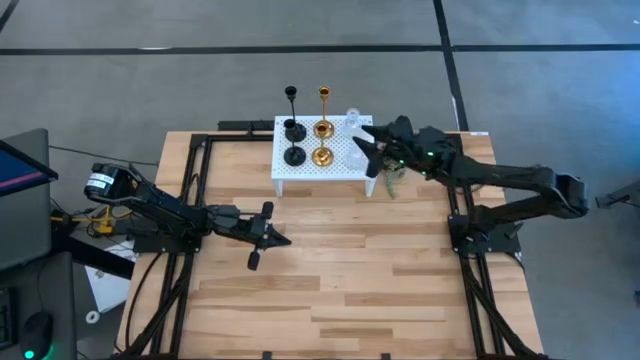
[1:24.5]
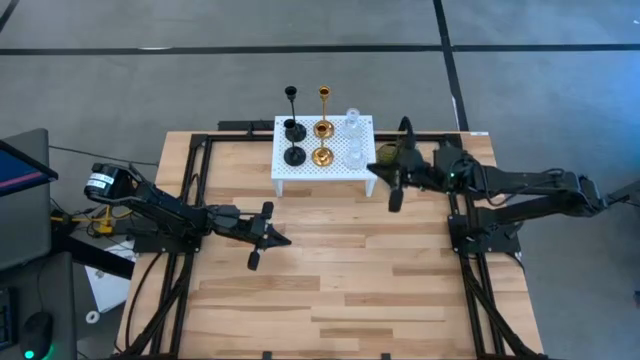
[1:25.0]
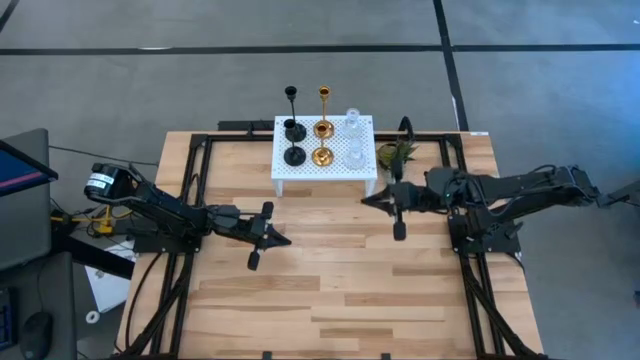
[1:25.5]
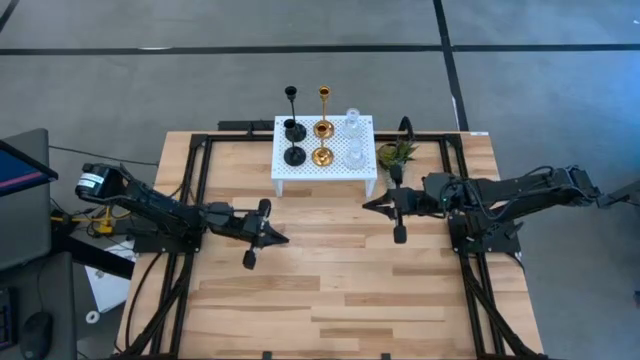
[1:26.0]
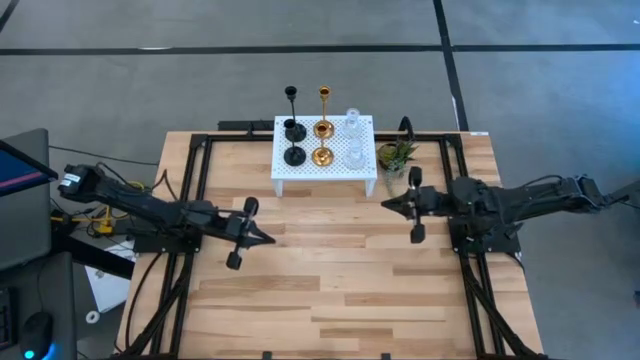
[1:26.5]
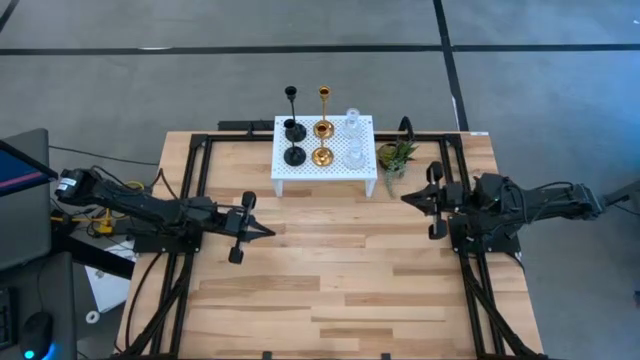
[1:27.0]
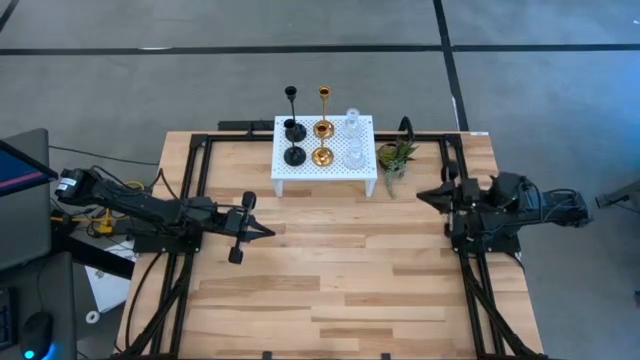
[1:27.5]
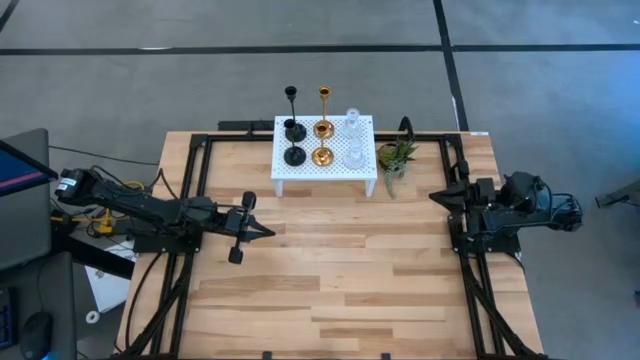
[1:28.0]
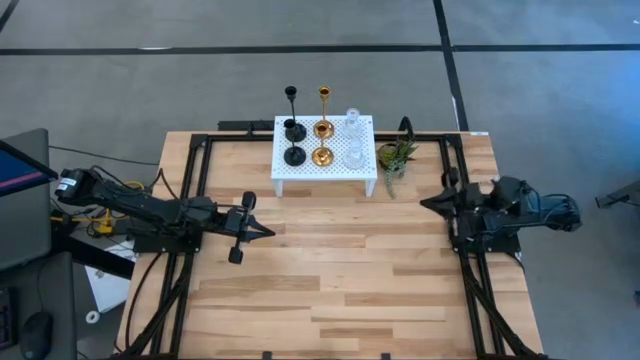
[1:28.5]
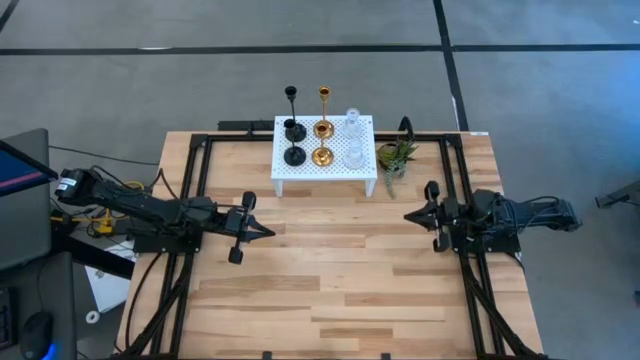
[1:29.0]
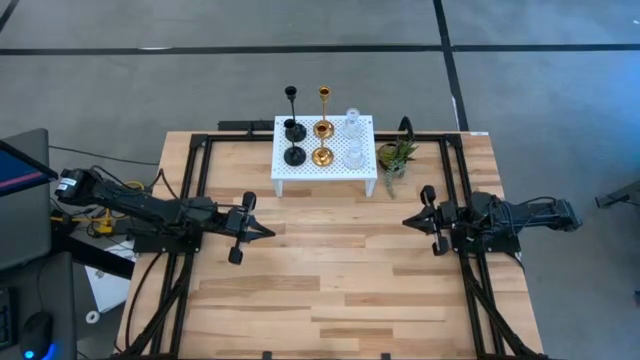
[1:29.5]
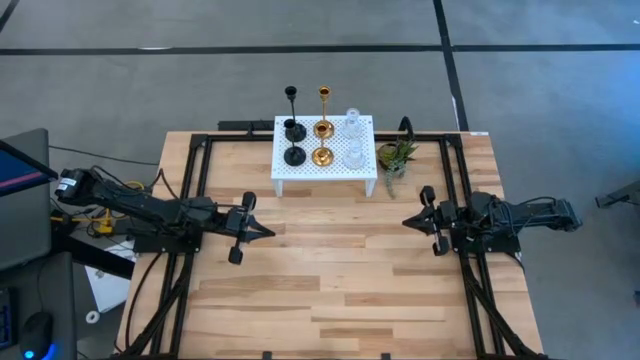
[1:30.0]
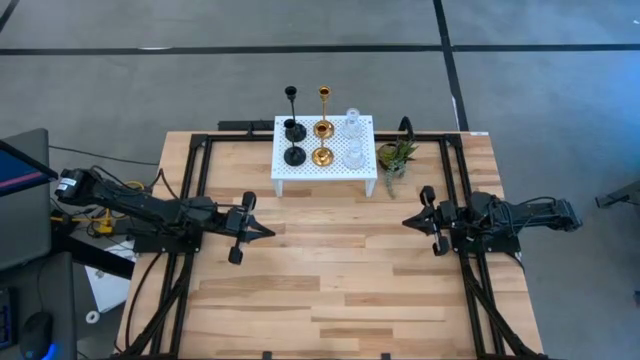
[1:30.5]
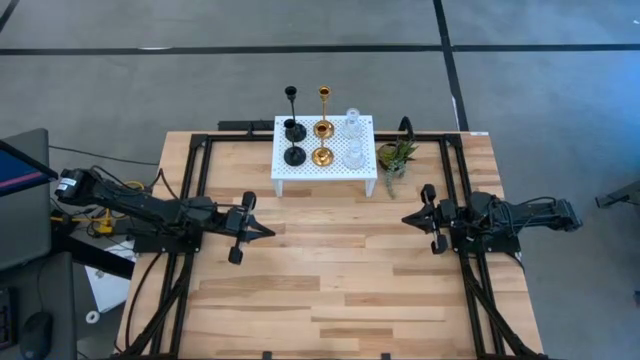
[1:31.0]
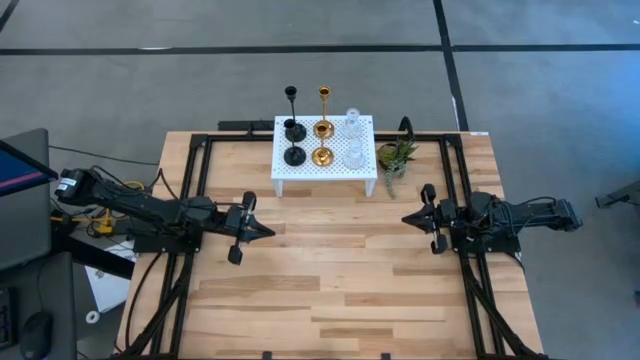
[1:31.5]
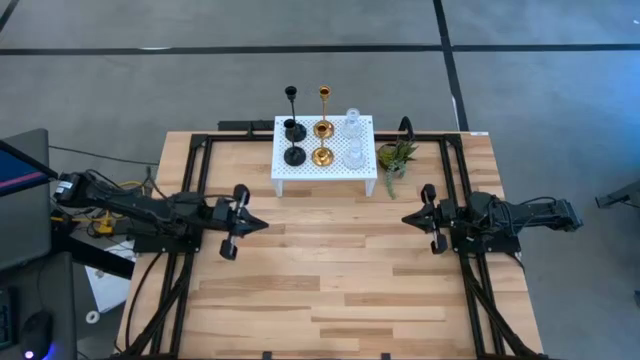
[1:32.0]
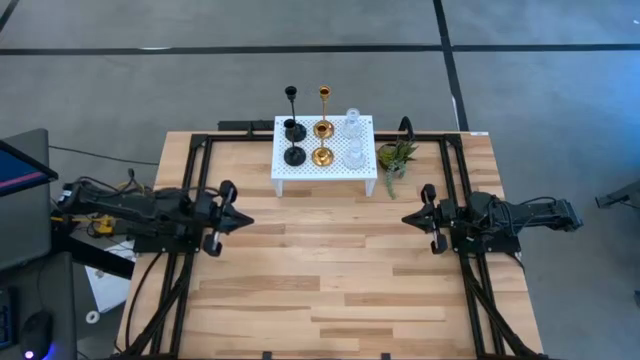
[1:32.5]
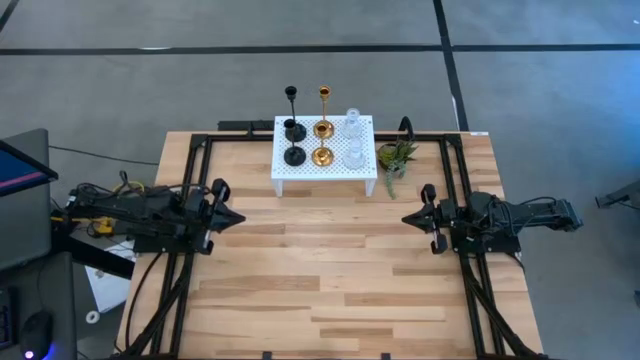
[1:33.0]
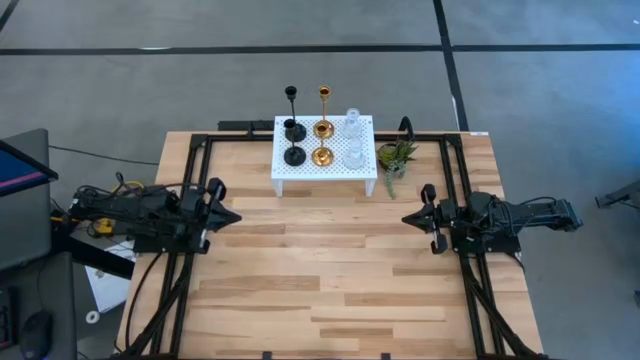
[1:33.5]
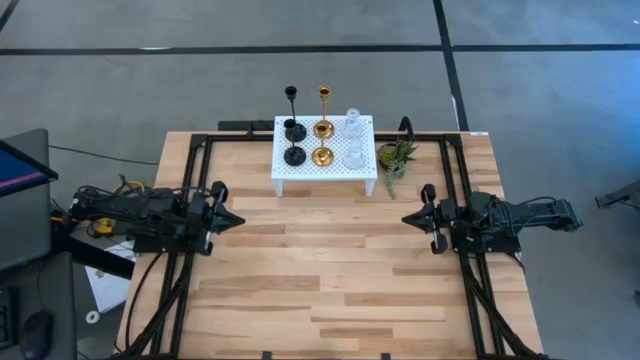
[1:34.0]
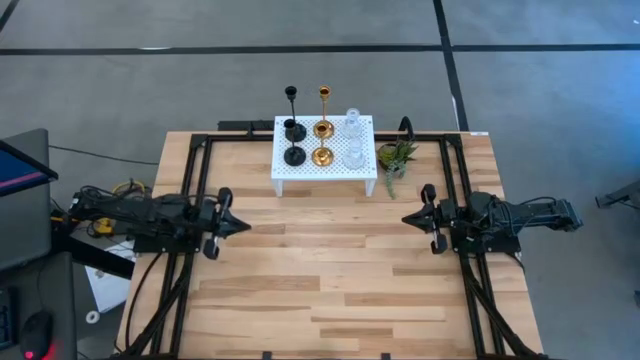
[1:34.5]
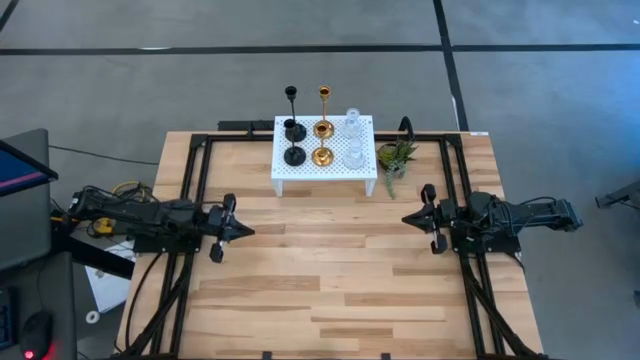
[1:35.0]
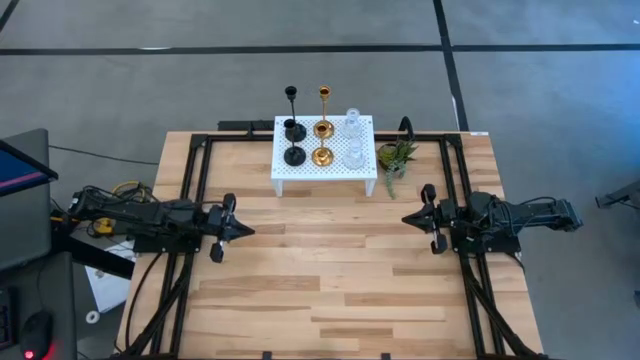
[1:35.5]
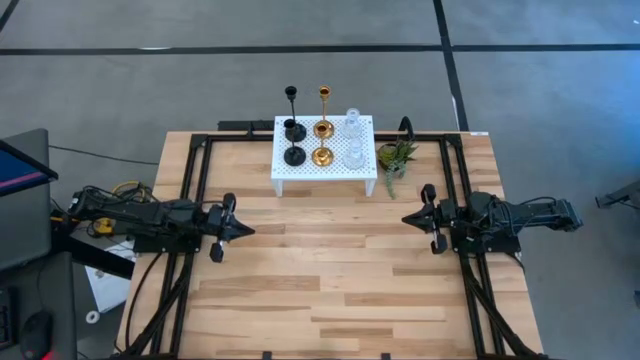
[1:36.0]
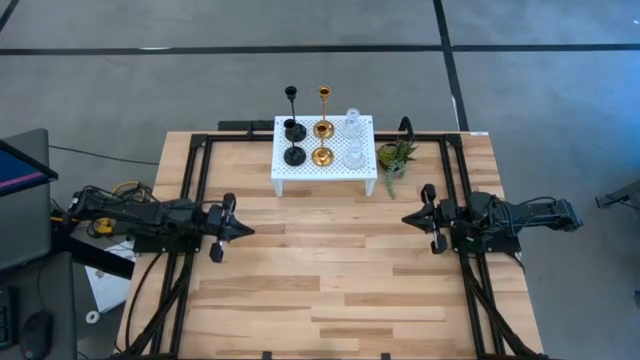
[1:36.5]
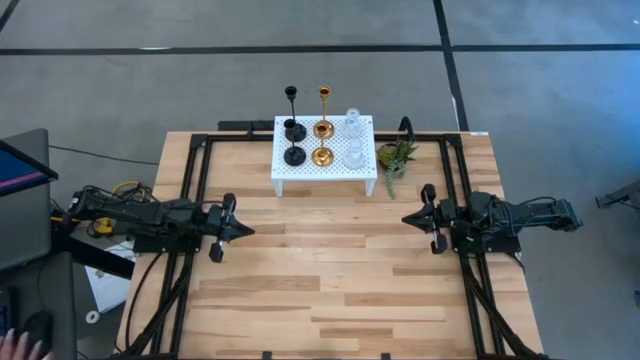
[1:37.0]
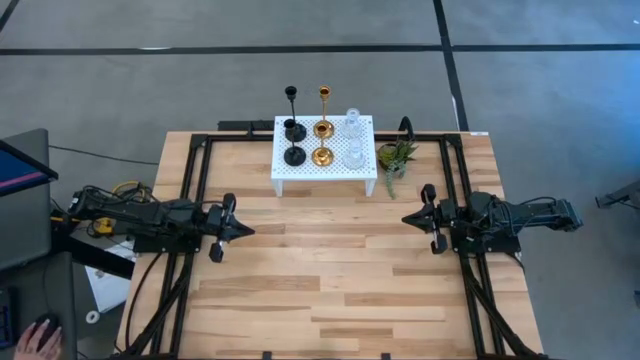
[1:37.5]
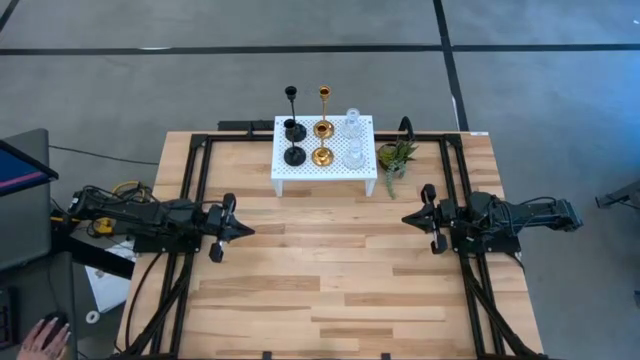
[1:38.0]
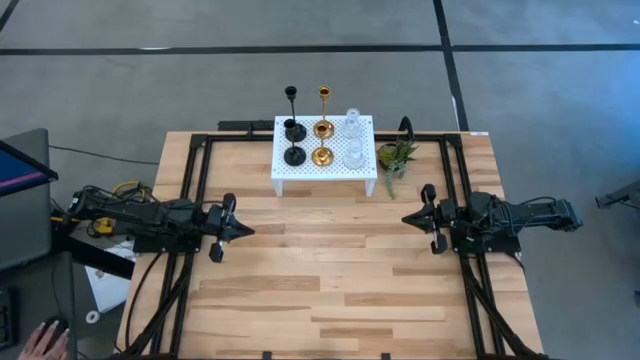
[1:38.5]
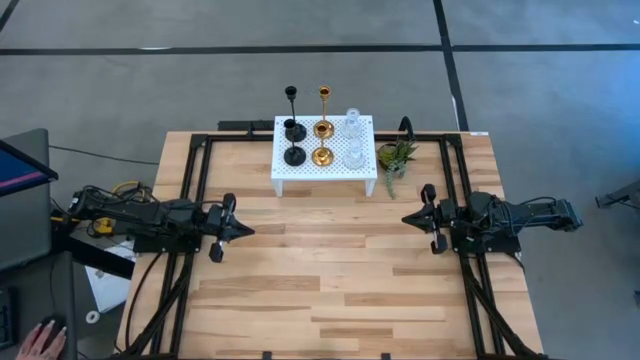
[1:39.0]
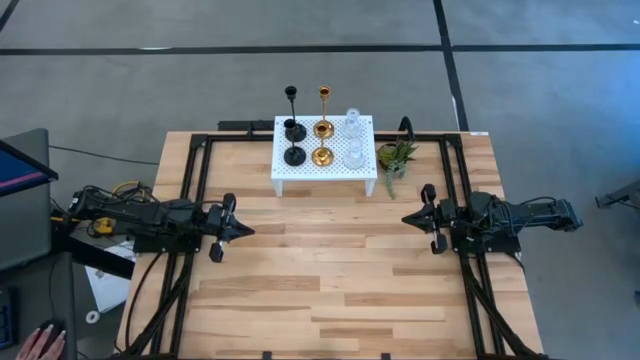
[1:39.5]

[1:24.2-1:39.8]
Task: Pick & Place candle stick holders
Return to Home Position

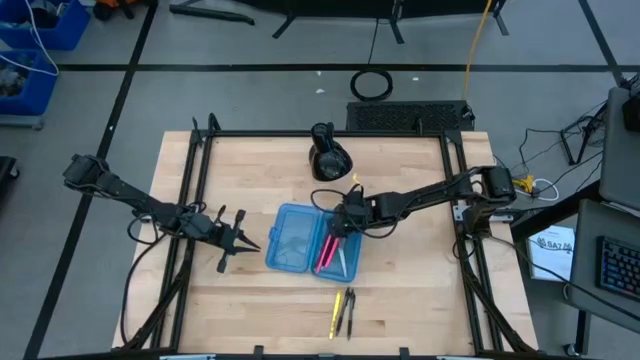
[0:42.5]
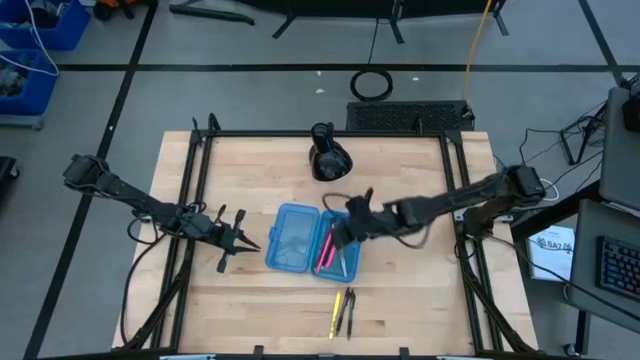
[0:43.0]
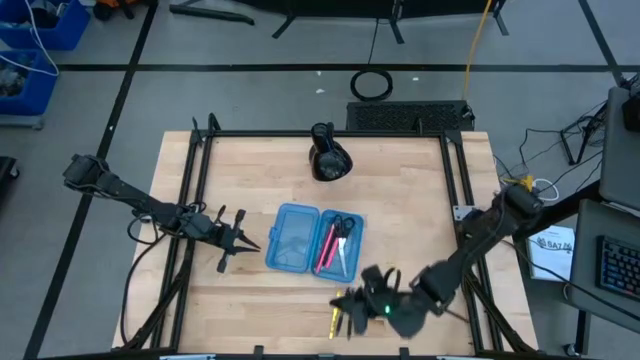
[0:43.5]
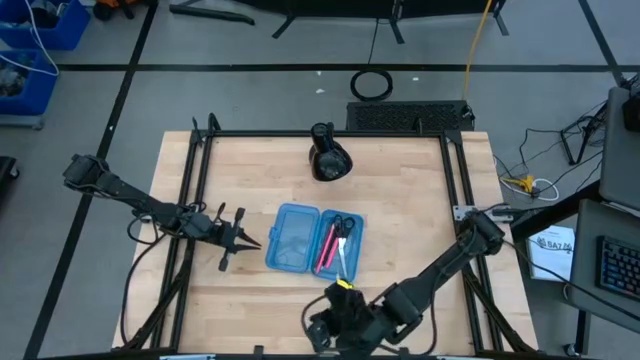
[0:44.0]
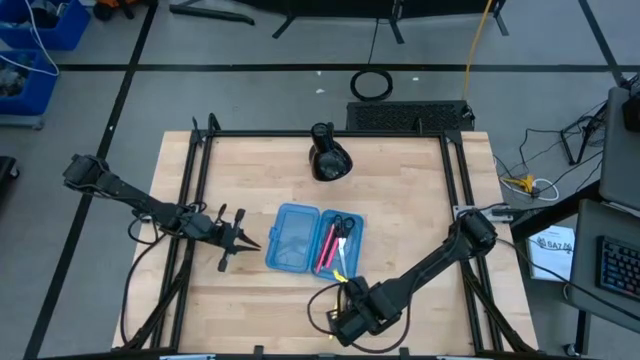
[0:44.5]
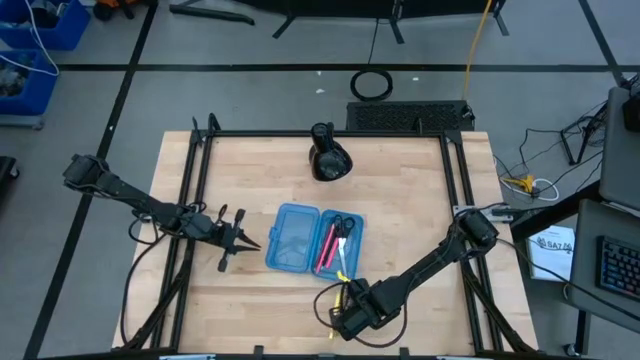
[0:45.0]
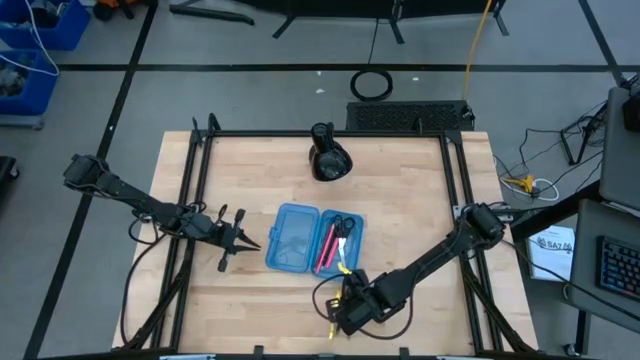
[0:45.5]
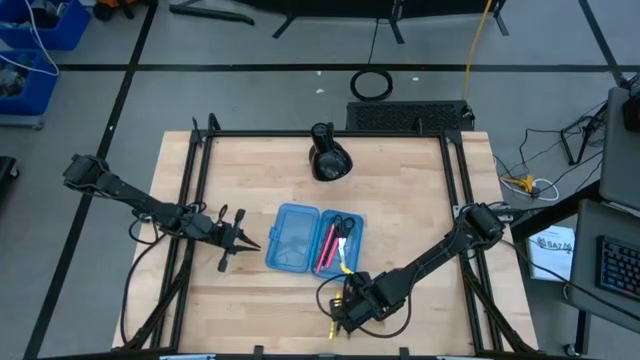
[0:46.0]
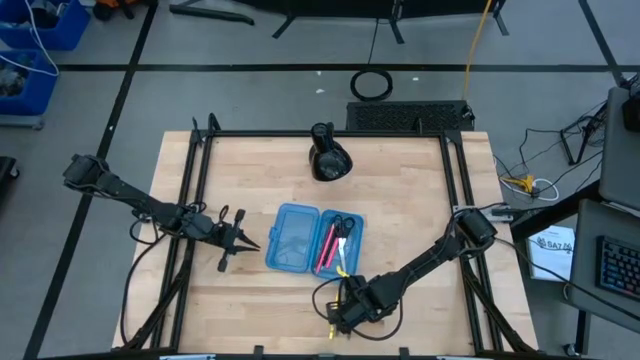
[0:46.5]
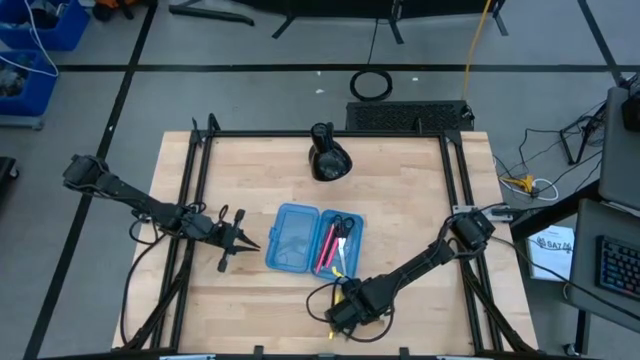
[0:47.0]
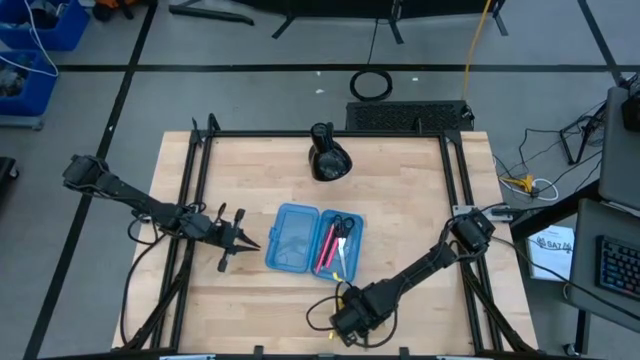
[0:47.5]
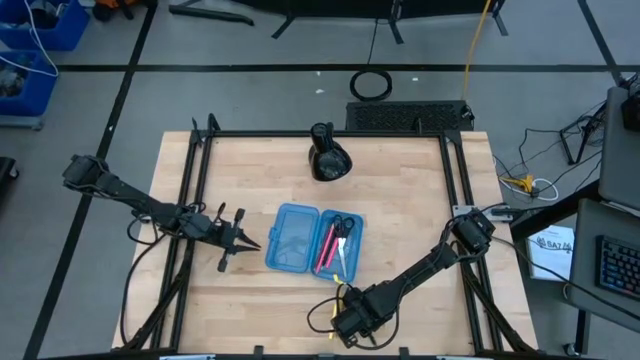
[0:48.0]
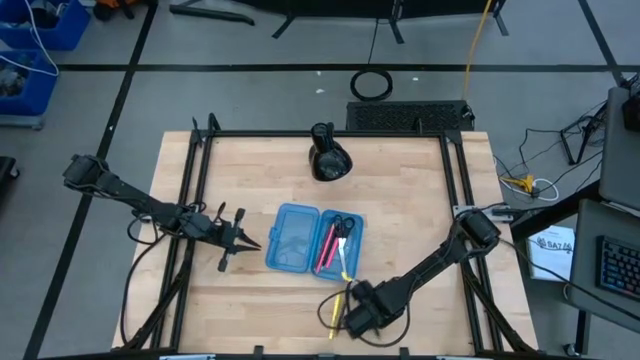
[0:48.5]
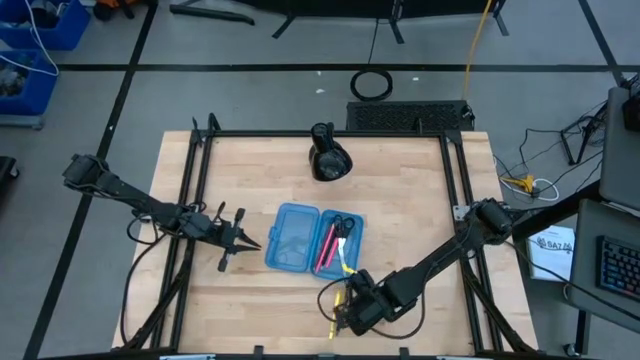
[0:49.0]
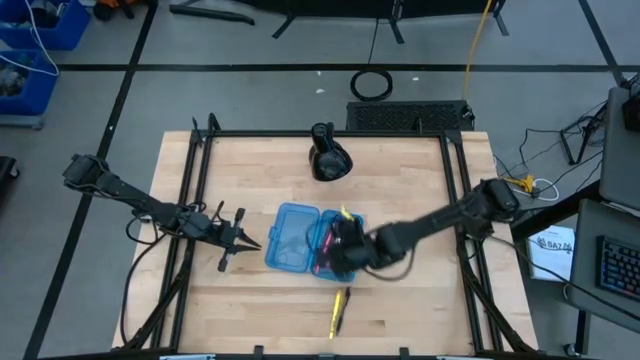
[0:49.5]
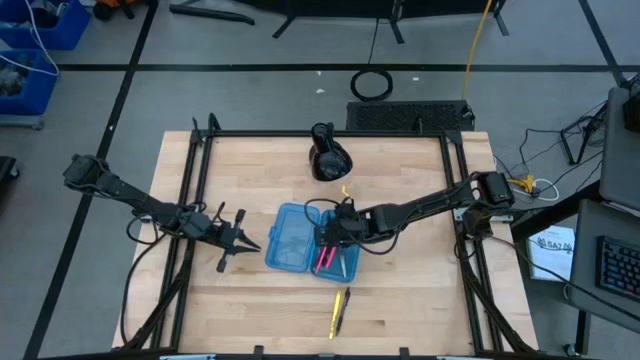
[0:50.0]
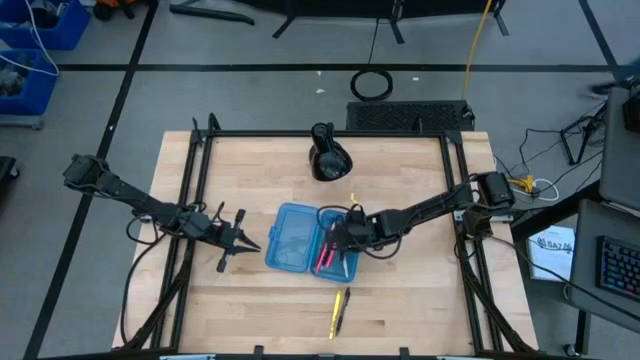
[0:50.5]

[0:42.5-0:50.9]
Task: Pick & place school supplies into a supply box
Put the right black pen into the blue supply box
